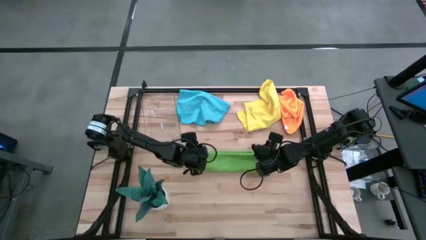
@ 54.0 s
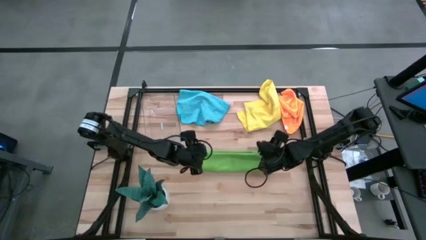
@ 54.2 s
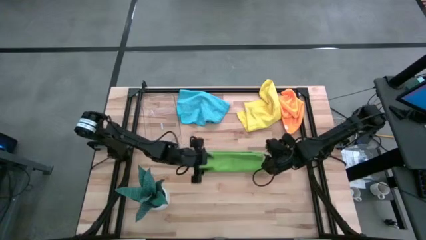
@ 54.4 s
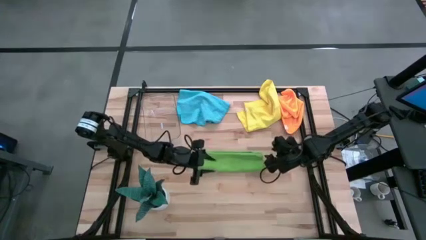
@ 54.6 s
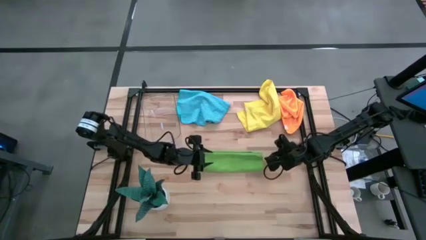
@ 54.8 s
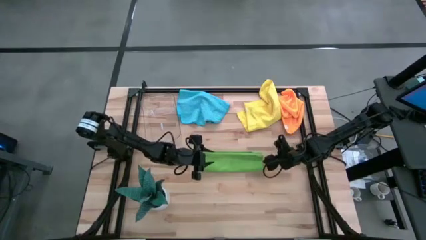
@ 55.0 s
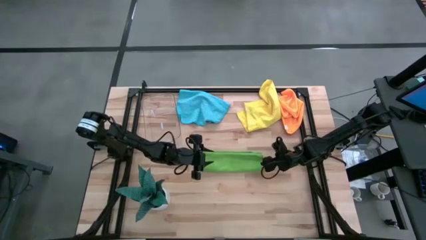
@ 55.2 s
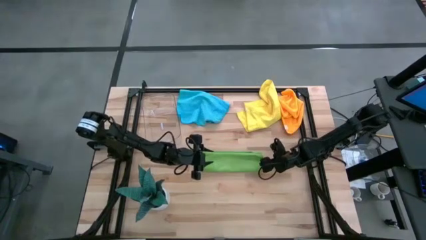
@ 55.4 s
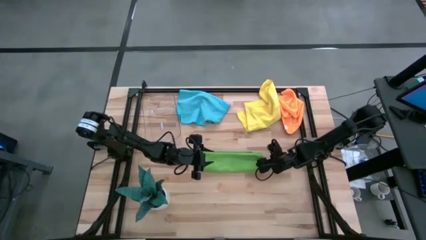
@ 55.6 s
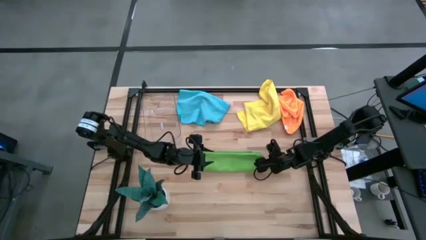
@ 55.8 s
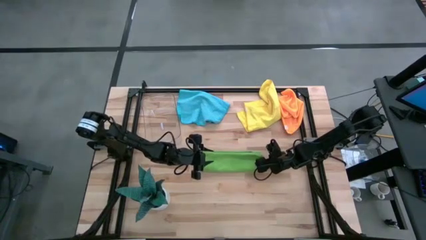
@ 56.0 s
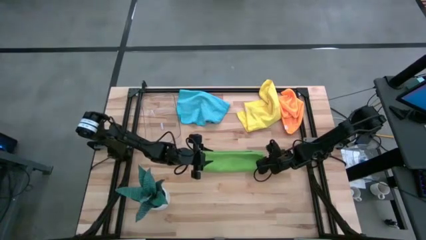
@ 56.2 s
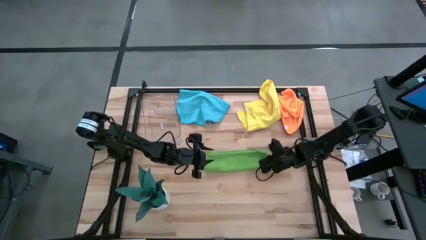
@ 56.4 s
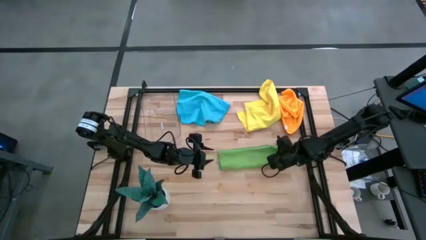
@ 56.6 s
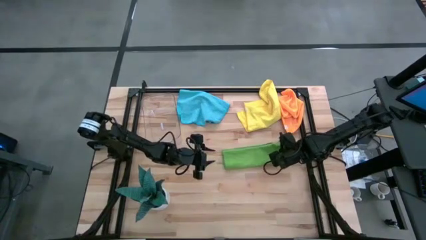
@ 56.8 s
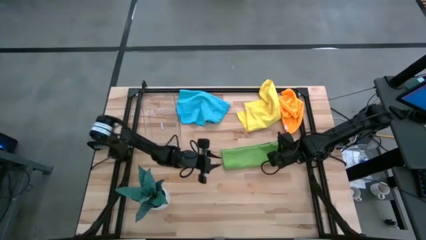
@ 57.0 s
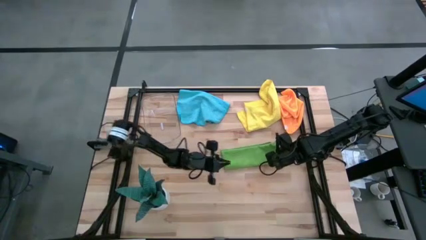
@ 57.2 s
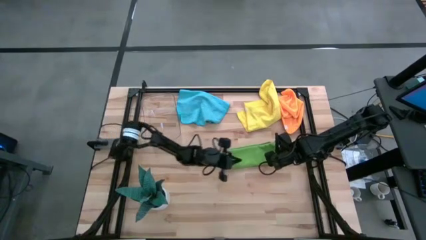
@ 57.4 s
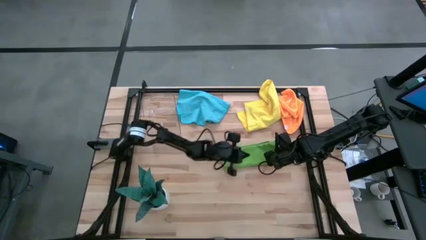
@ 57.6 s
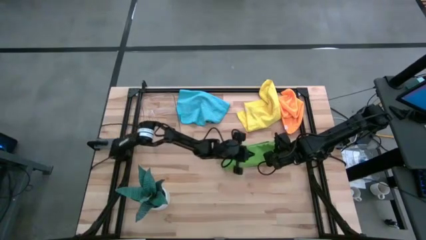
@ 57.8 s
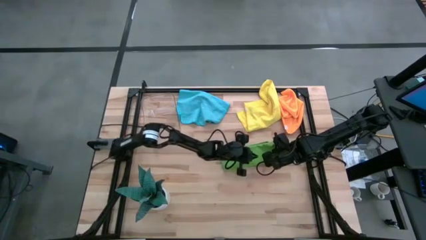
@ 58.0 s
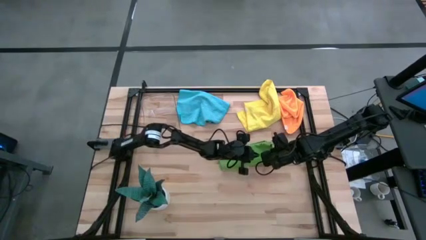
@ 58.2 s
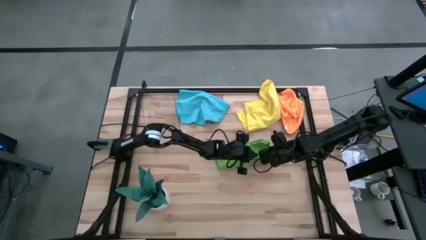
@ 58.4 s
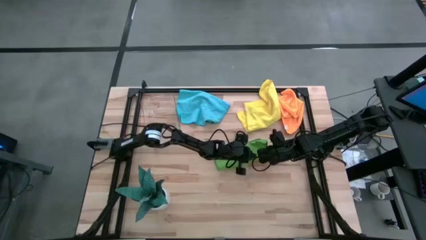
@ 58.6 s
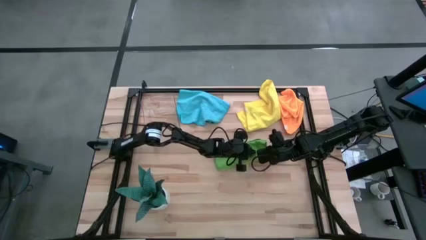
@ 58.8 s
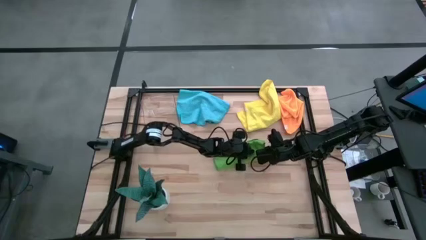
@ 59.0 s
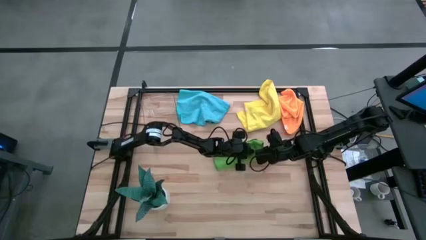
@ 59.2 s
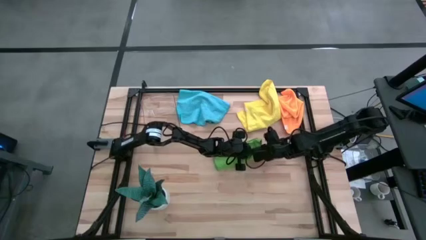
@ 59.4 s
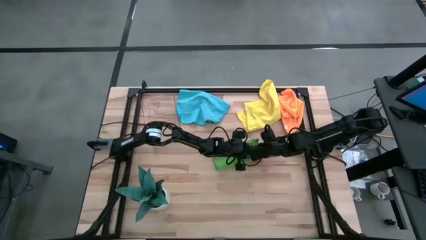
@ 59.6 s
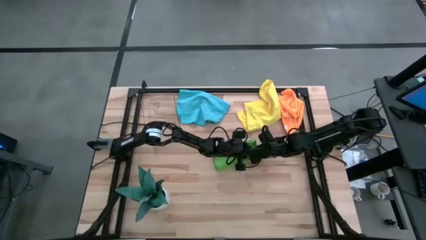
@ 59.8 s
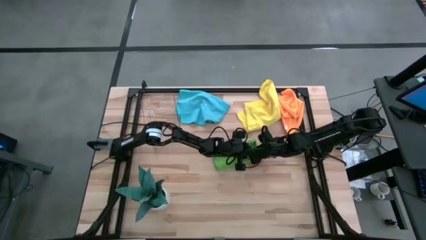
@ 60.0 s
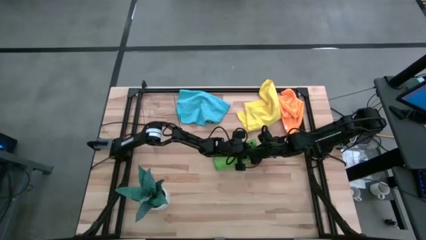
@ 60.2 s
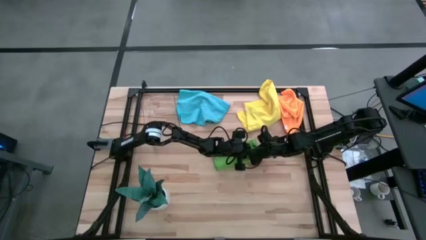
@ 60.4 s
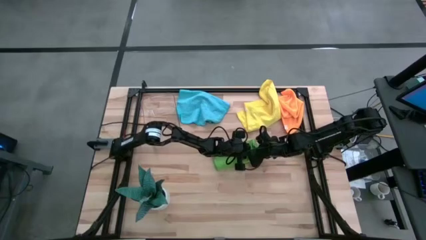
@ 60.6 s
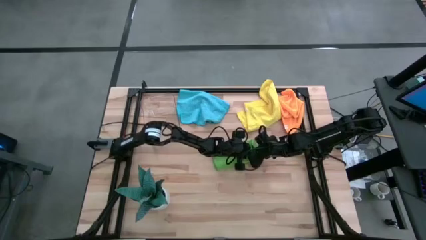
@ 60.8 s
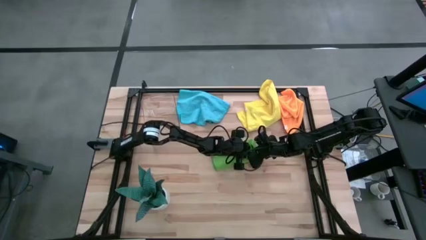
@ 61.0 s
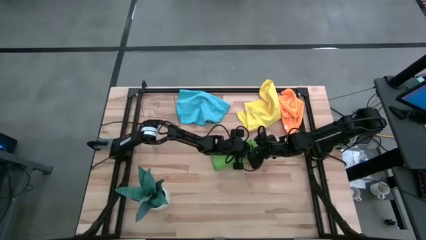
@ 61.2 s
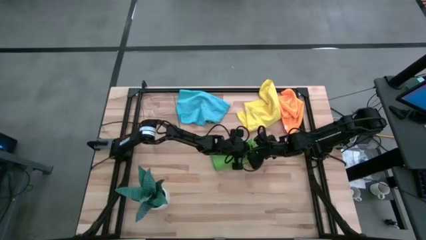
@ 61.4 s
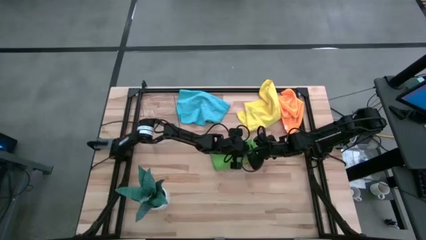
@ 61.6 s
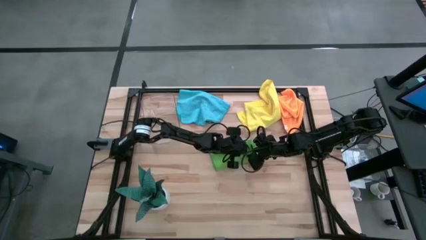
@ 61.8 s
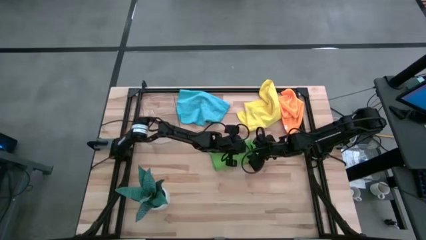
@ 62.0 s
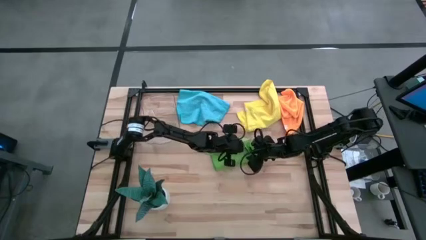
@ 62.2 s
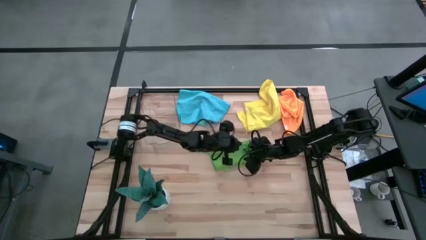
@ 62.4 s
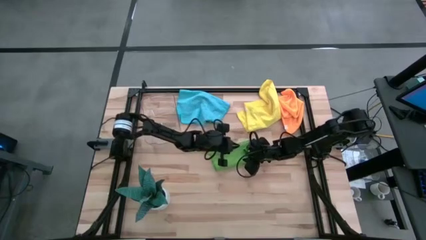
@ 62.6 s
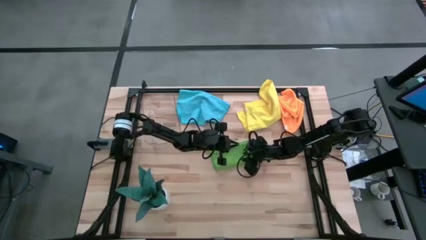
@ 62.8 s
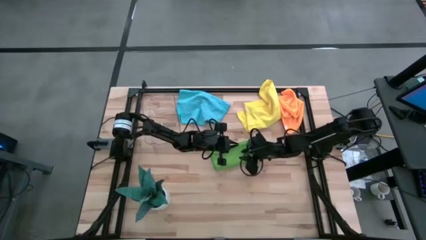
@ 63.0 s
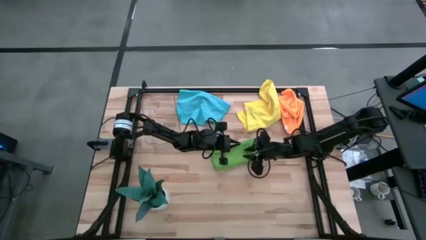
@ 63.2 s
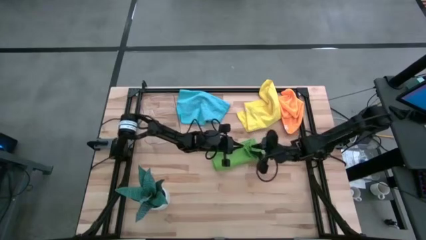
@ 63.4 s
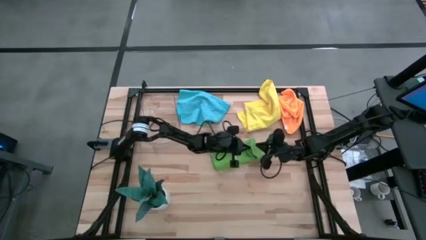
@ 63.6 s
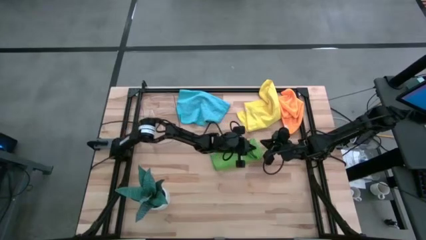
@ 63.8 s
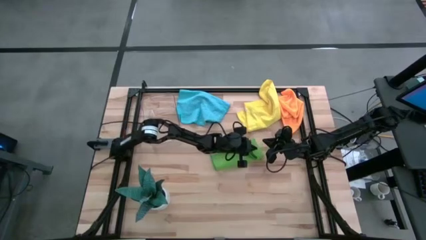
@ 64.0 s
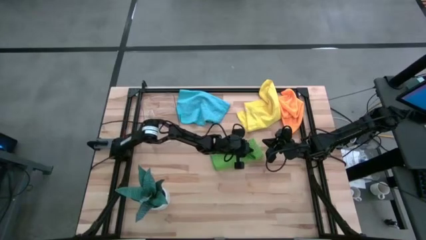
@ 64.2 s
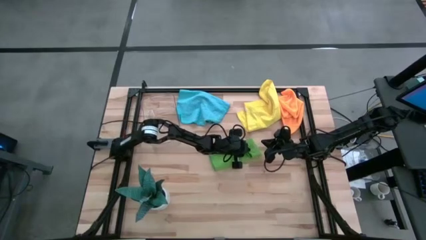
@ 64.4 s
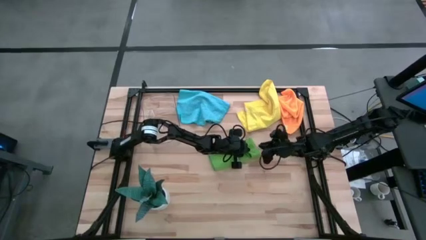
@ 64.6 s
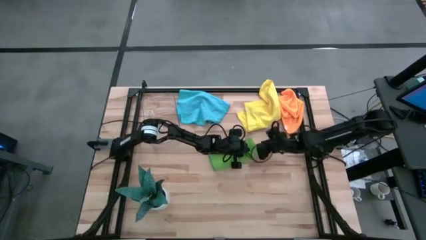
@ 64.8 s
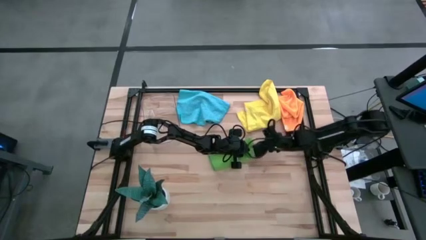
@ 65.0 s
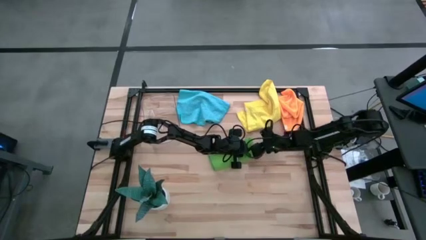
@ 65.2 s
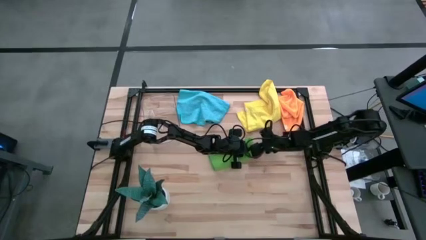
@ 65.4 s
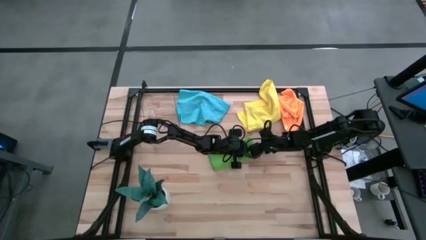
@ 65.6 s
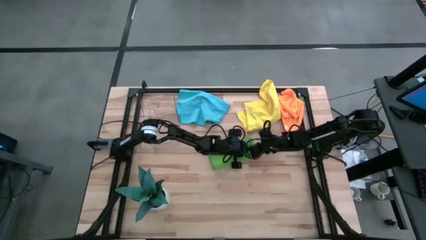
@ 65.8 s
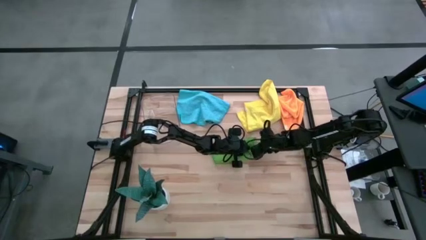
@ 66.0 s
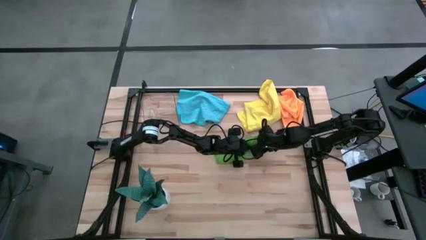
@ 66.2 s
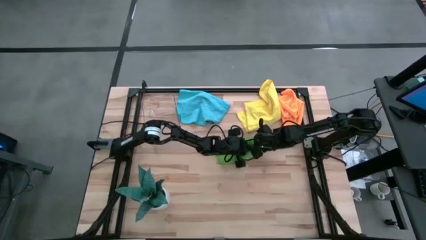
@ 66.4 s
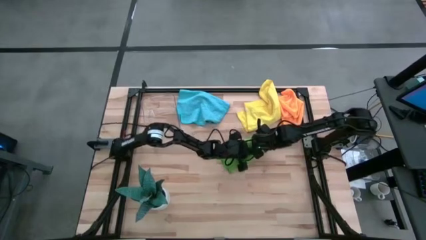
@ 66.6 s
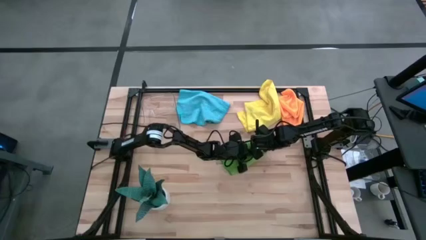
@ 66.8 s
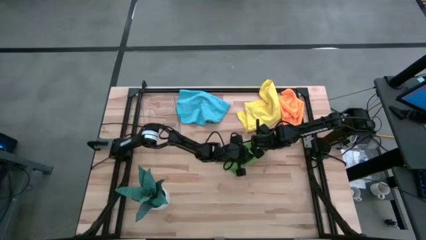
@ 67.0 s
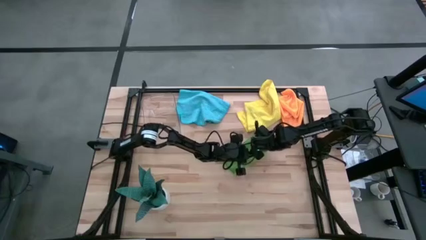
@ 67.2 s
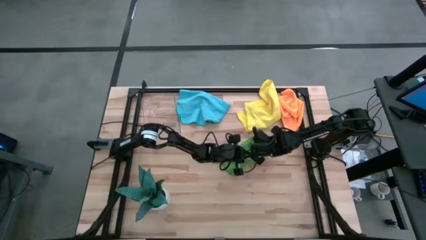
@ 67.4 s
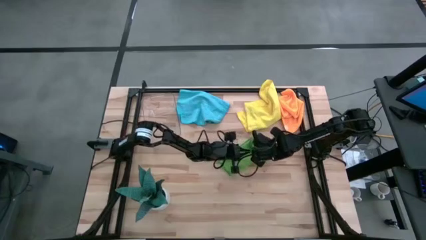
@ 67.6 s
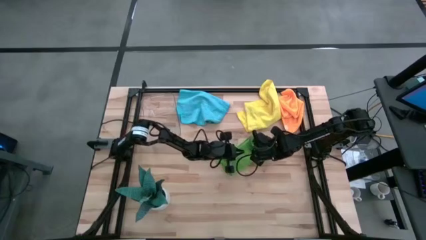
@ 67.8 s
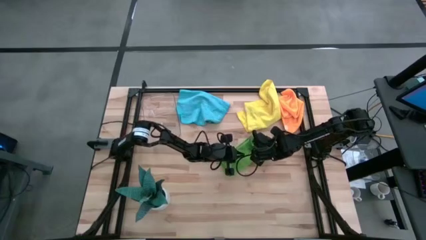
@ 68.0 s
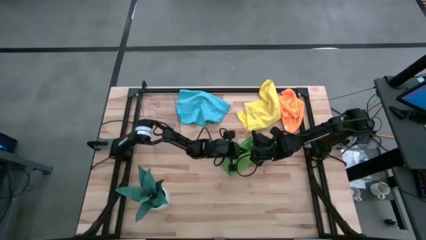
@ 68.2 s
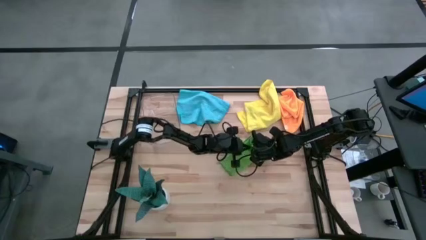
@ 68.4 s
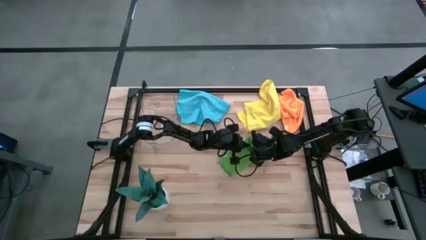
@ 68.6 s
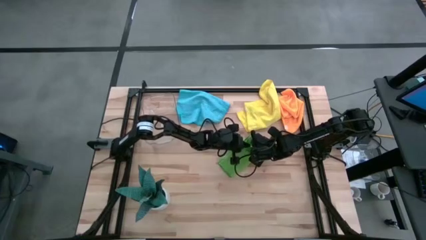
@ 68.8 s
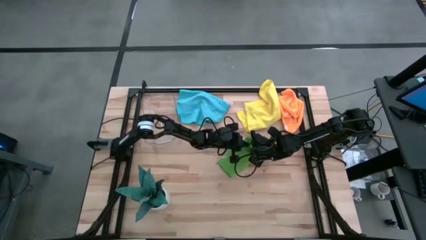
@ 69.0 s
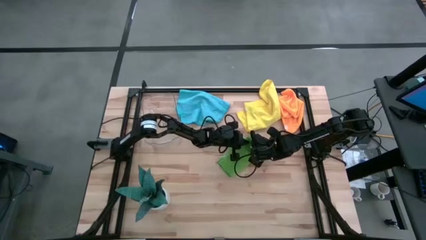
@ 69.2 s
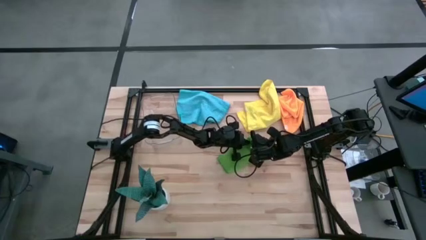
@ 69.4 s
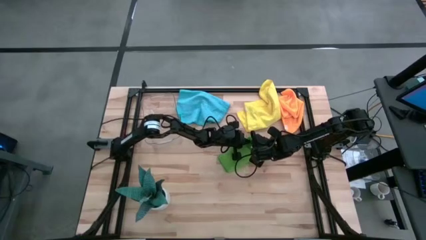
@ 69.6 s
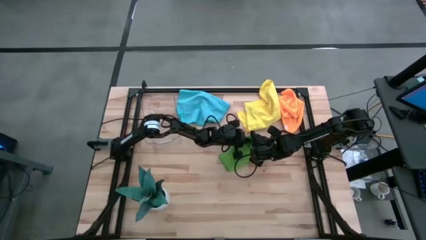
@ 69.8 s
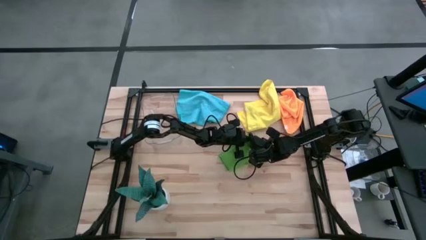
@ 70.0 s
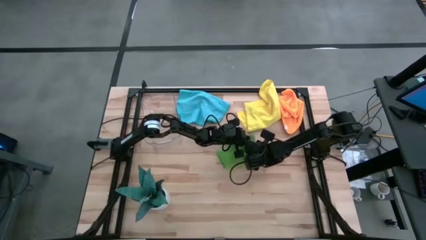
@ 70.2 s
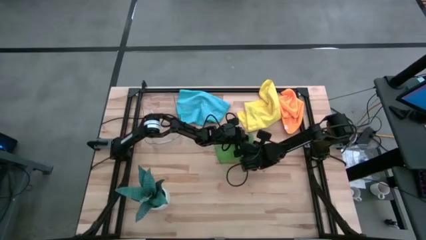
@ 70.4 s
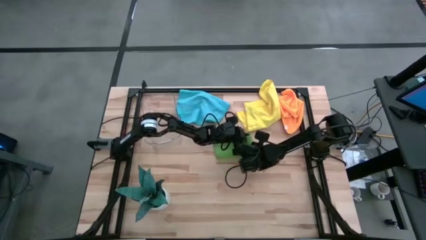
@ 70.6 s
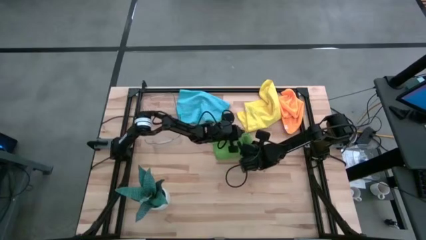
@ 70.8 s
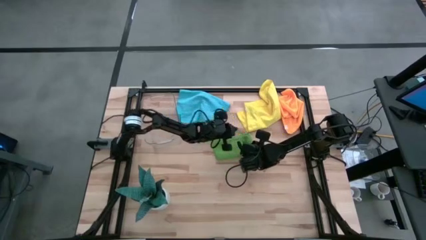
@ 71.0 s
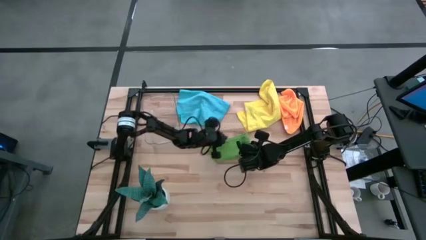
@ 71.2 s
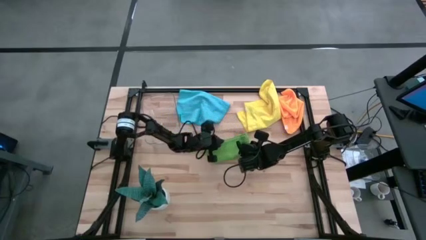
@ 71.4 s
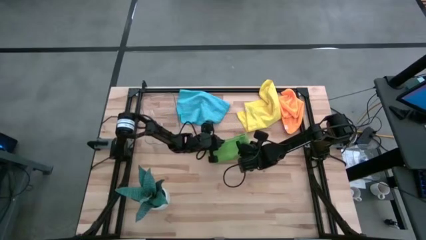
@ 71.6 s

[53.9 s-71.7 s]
Task: Roll microfiber towels into tight, uniform cylinder then place into a basket
Roll the green microfiber towel
